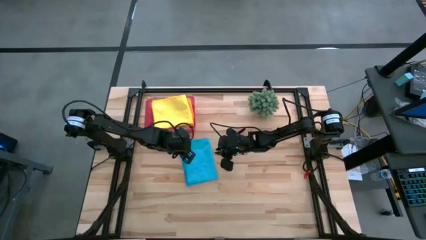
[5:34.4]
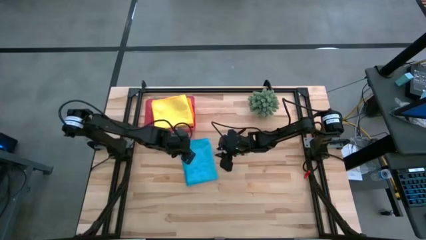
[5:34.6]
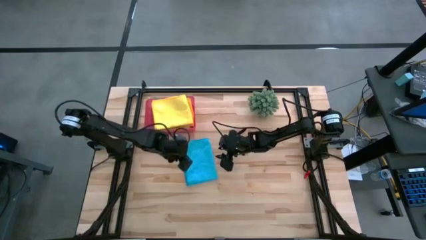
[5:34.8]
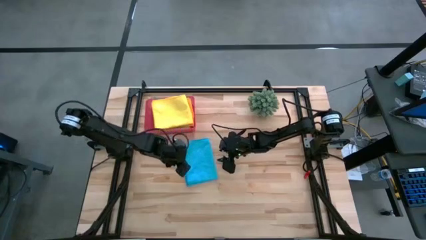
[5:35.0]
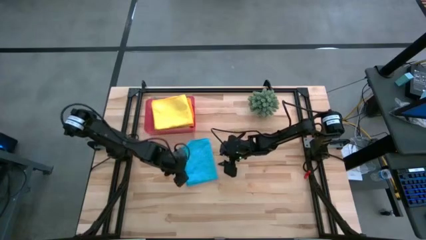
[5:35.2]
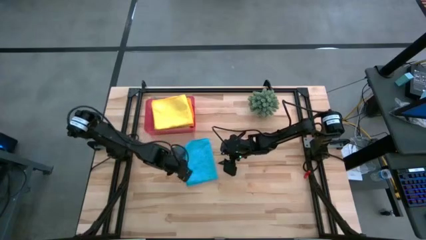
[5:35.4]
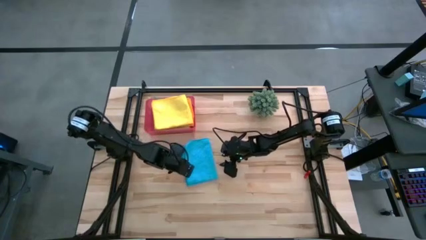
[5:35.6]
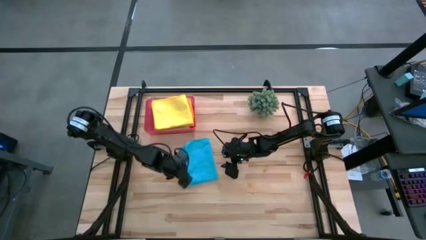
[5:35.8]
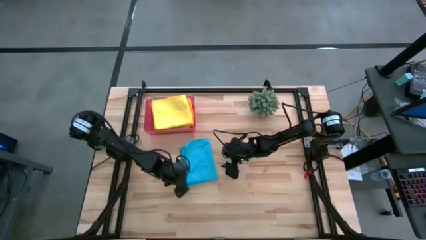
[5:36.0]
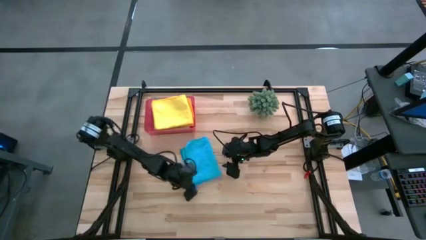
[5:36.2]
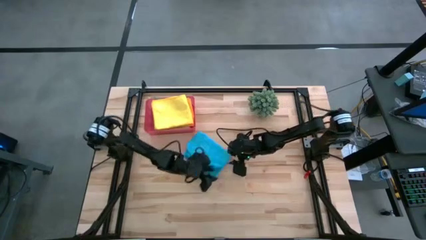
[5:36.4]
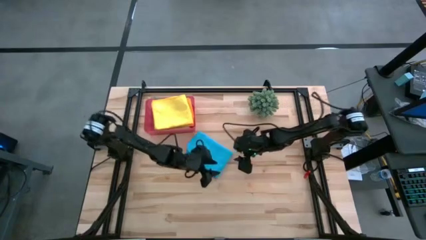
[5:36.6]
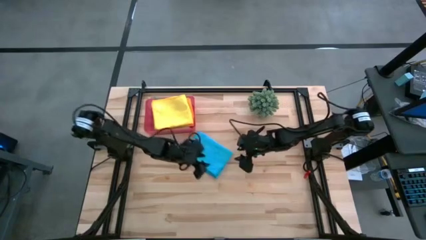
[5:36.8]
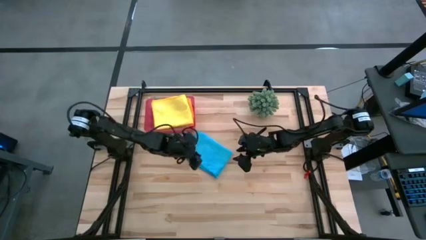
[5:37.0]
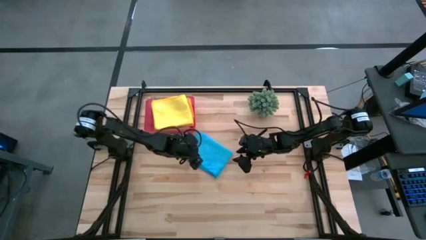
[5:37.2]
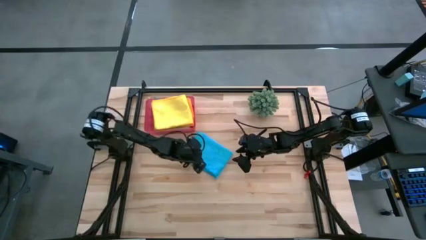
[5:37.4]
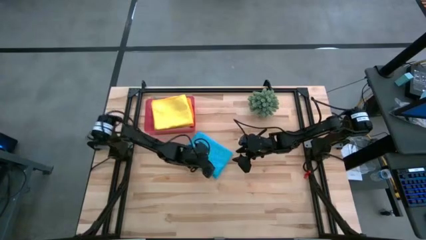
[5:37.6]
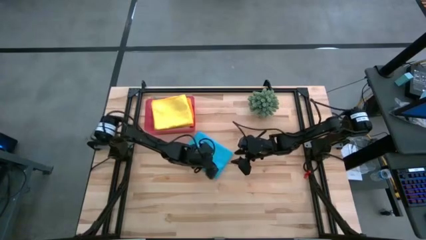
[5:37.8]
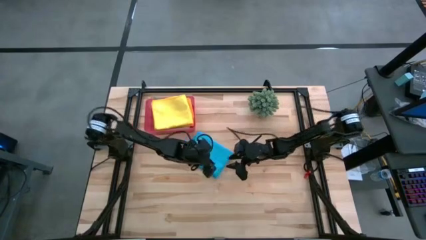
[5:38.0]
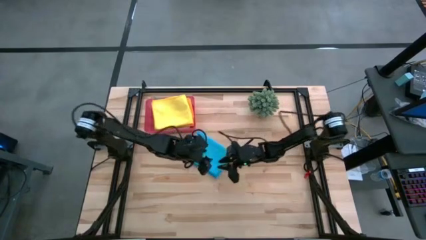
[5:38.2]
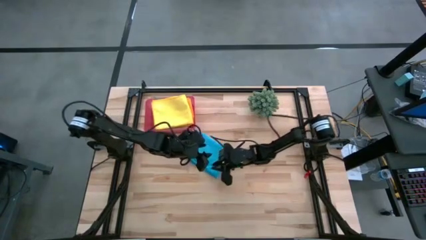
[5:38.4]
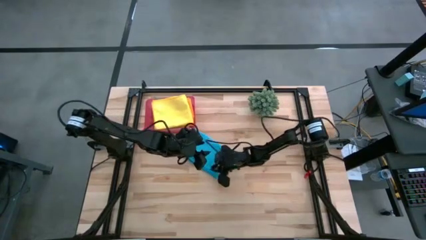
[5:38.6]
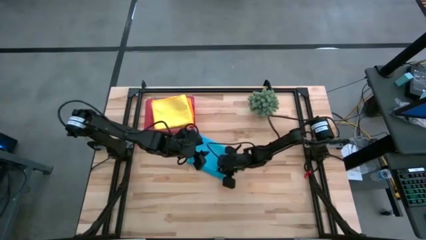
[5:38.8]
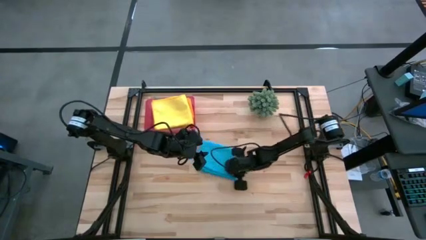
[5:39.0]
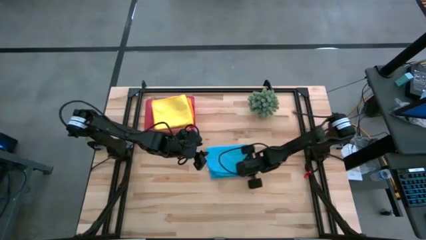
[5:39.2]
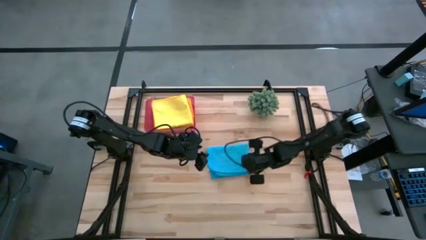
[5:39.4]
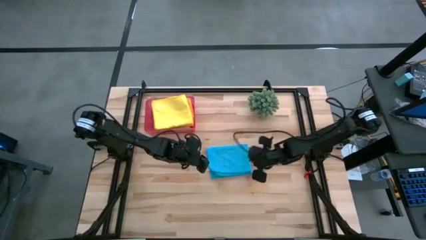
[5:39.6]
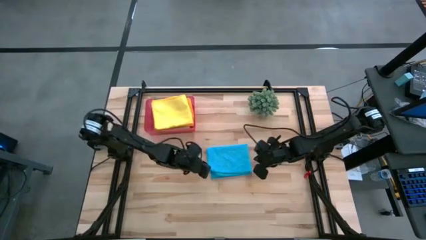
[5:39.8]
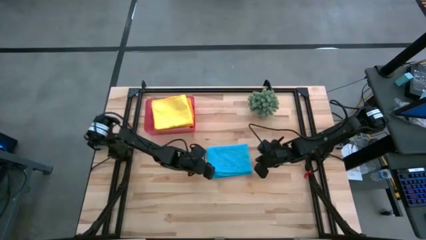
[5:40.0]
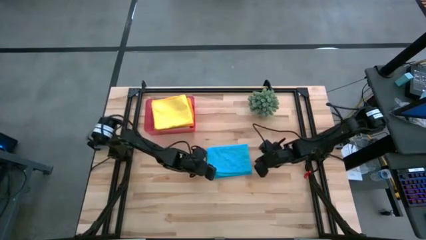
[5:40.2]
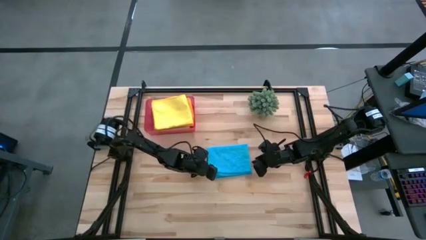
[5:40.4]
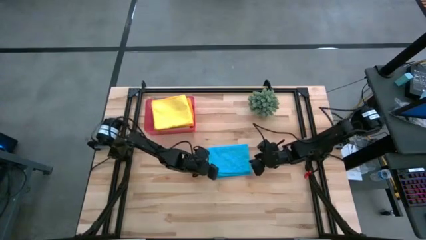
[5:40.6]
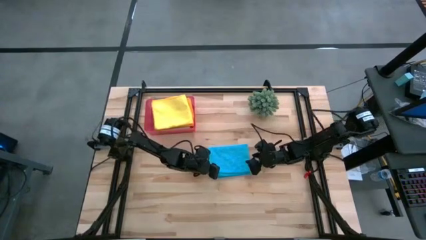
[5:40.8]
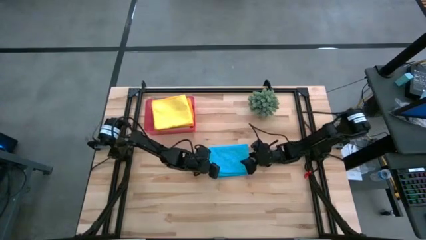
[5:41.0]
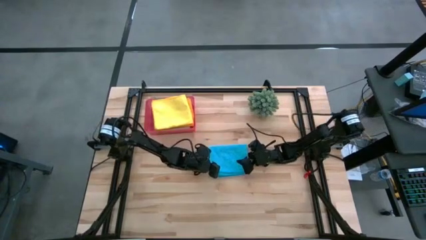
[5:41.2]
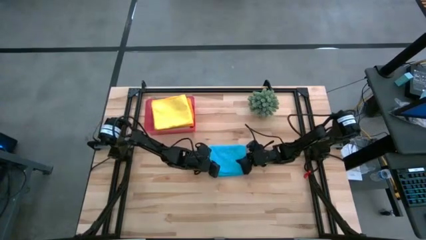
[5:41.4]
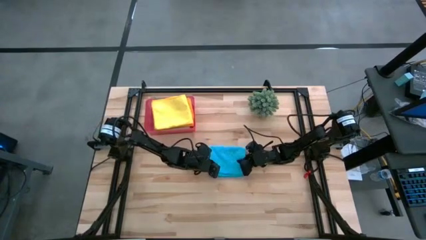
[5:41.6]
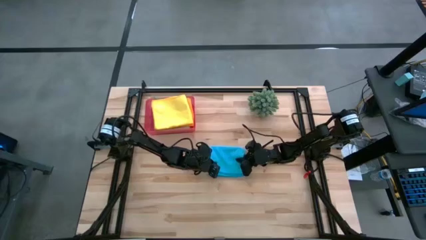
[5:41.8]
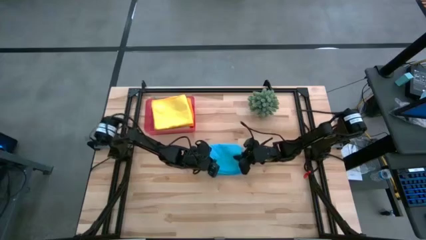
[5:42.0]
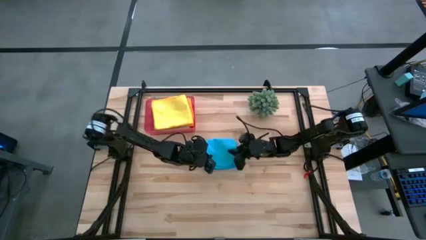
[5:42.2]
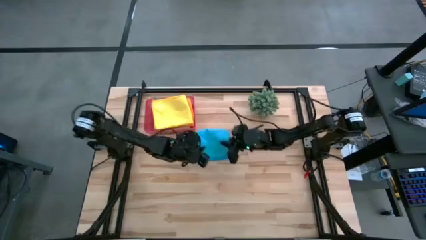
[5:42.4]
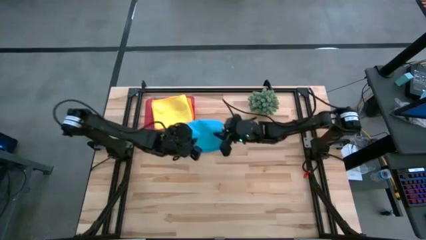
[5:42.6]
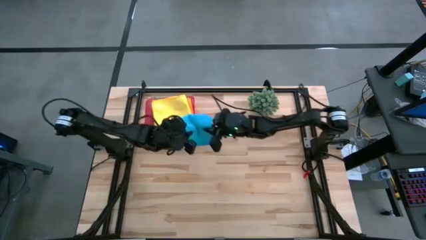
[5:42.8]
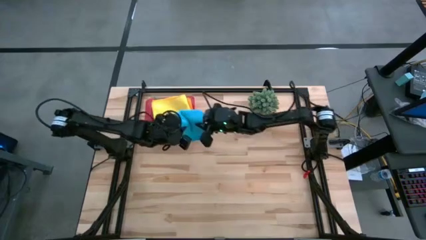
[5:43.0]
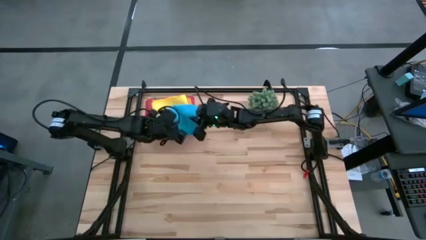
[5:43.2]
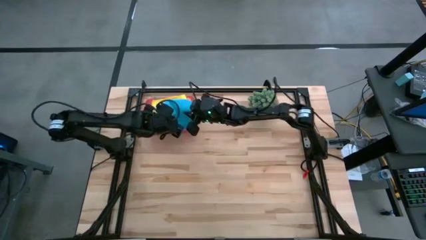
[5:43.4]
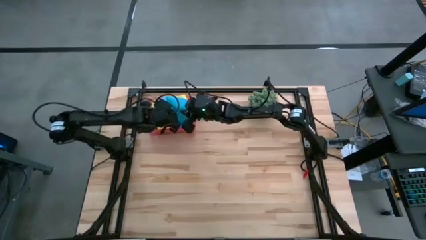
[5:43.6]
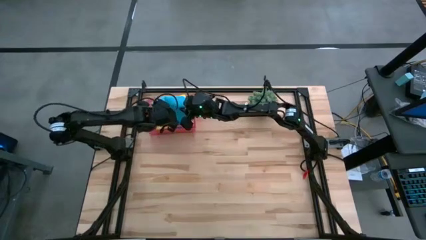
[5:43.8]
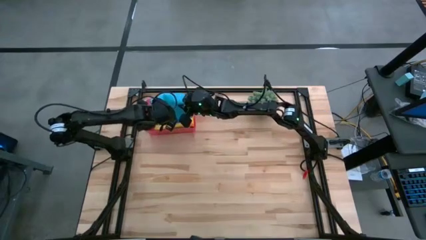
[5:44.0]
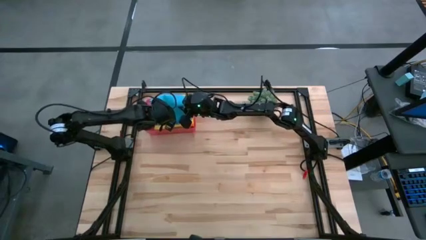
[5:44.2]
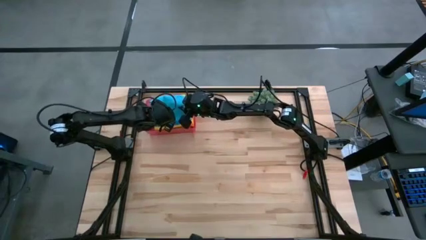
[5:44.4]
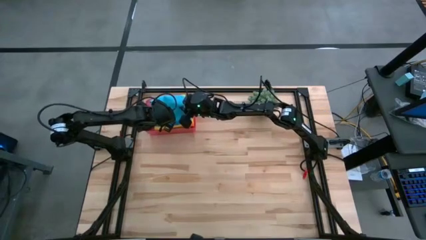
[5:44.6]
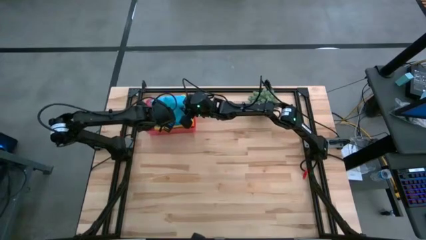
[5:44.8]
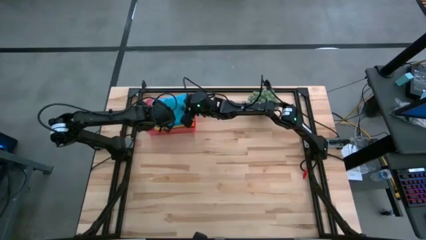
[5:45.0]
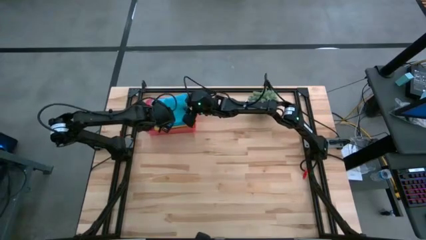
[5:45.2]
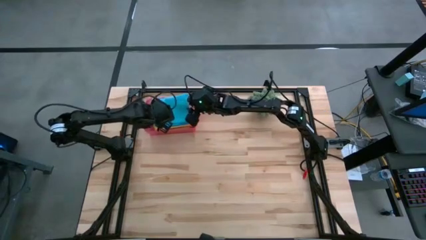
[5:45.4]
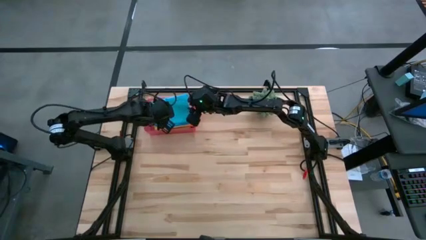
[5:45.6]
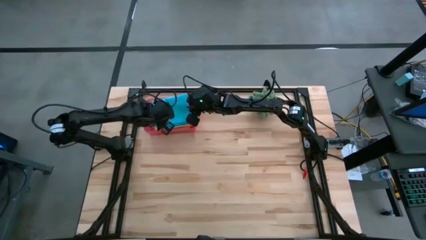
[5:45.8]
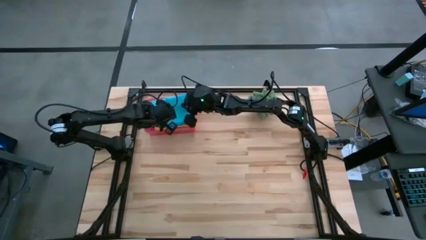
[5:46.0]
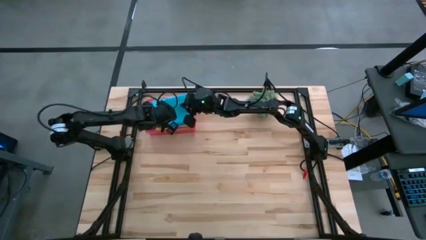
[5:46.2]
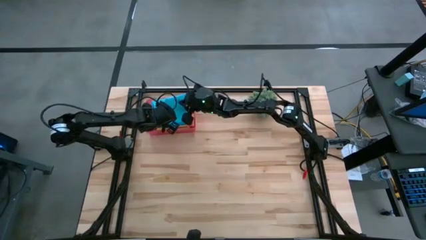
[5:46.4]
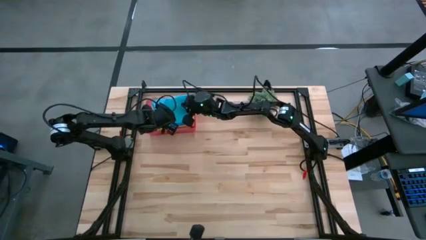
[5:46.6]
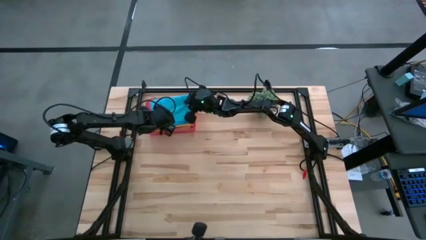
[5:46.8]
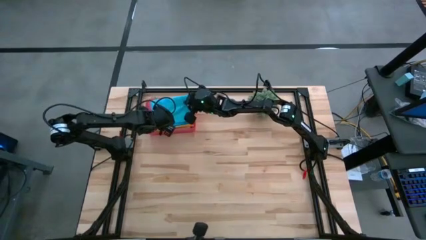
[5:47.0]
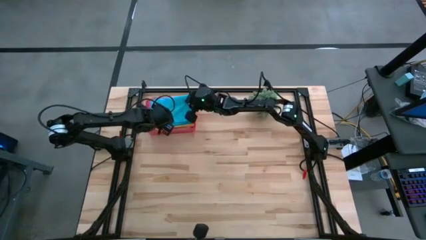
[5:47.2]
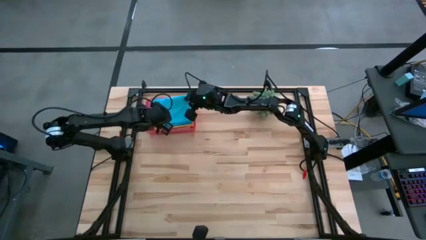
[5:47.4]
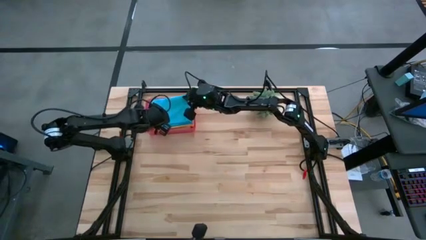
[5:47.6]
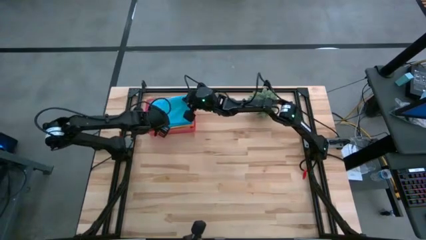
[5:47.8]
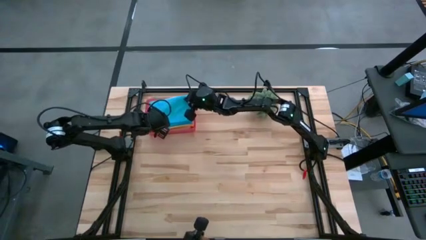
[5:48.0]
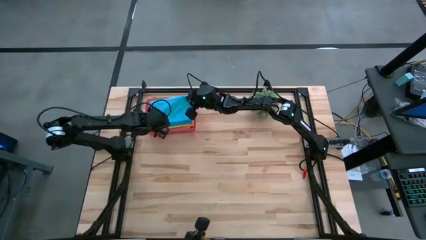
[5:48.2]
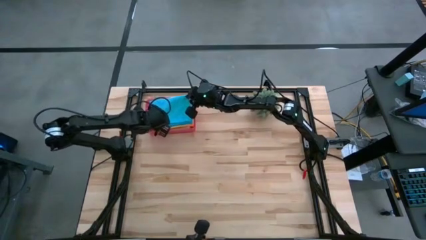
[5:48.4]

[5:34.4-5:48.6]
Task: Fold microfiber towels
Put the blue towel into the bin
